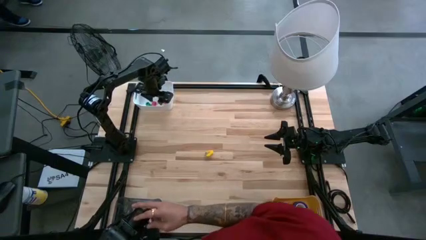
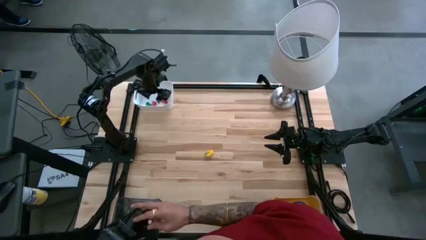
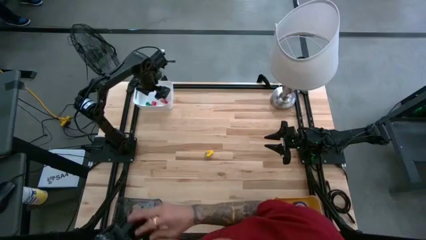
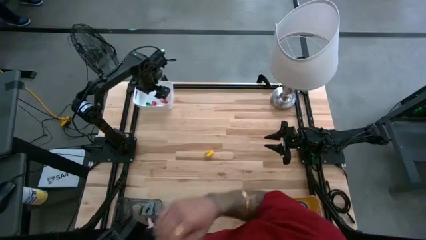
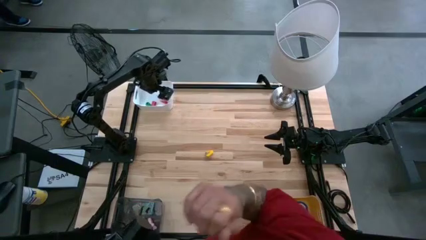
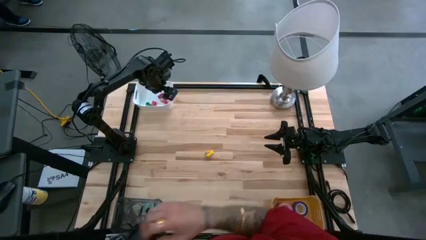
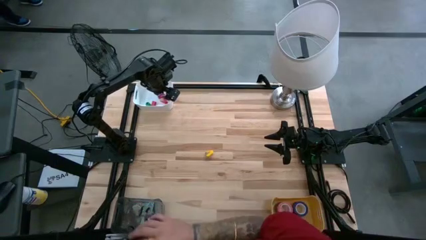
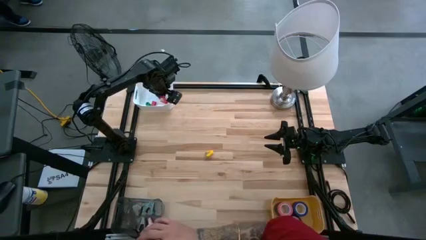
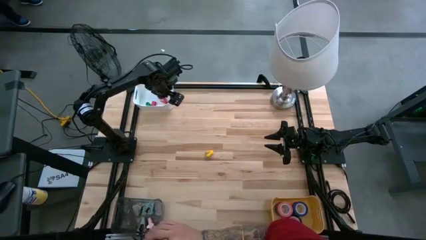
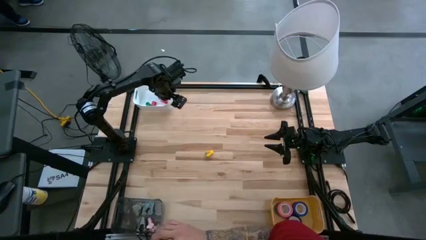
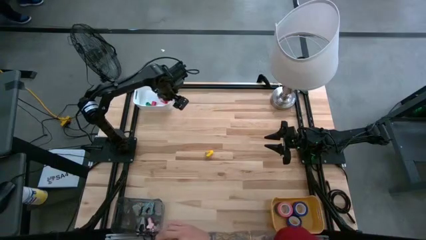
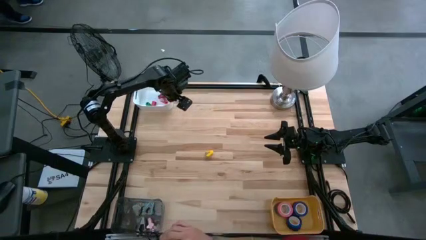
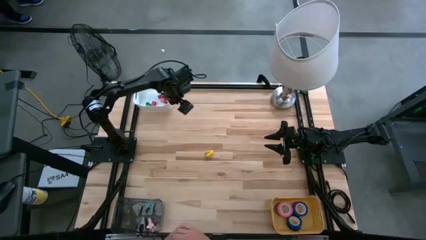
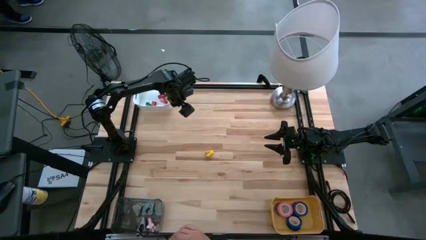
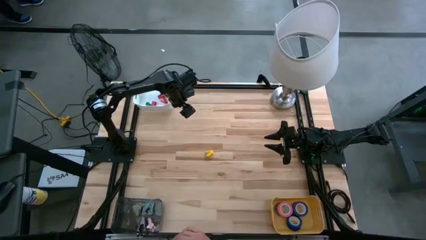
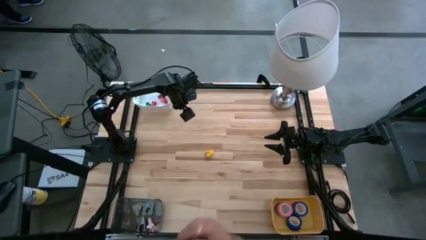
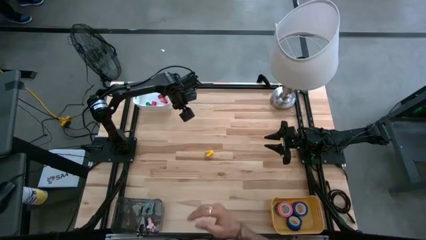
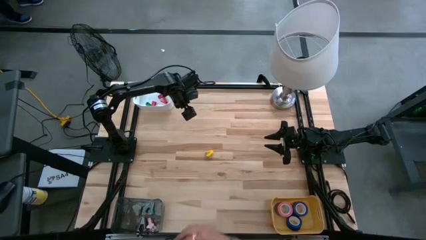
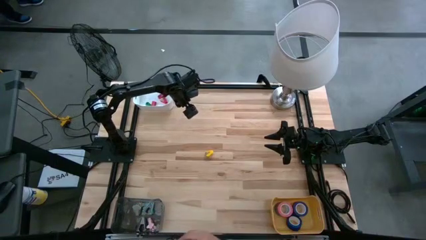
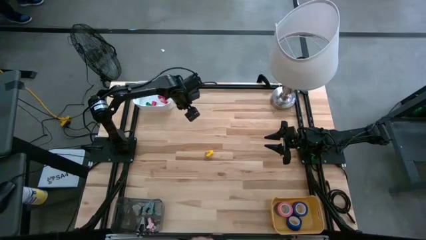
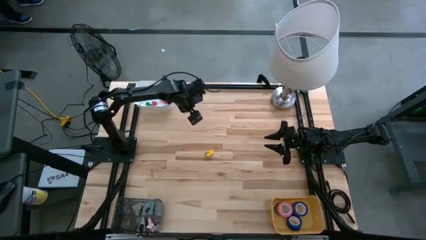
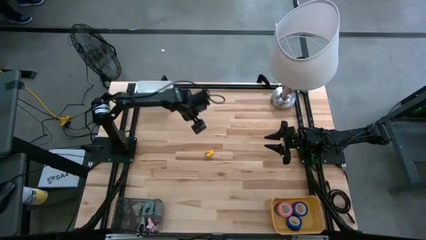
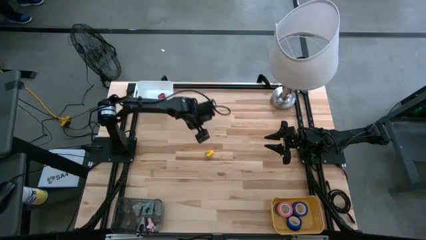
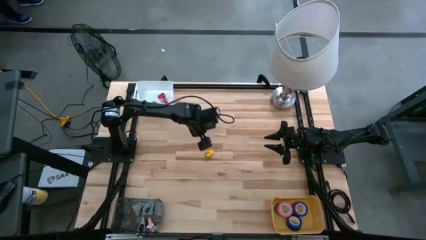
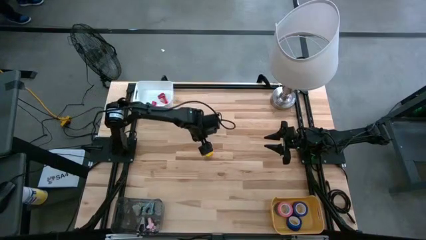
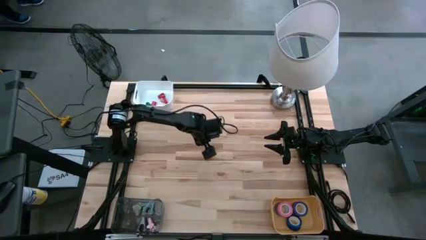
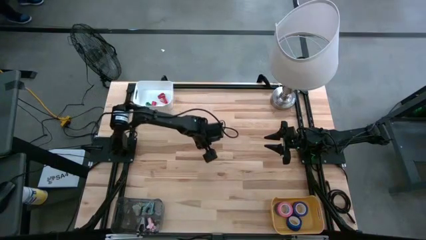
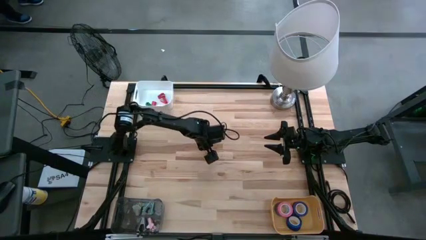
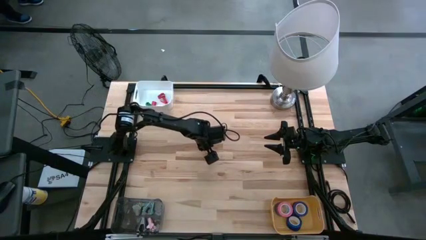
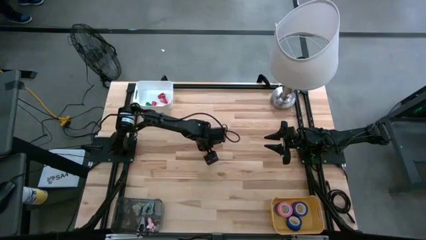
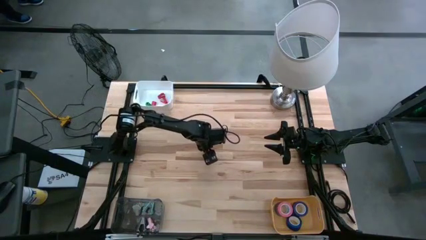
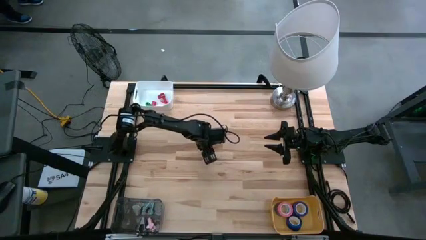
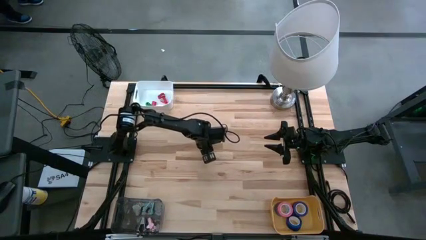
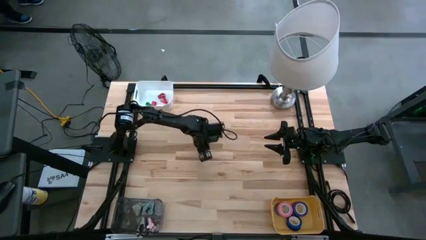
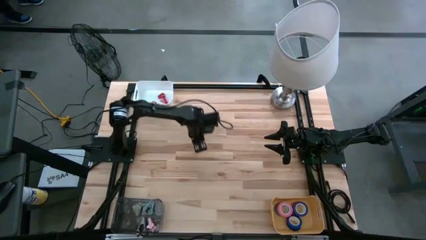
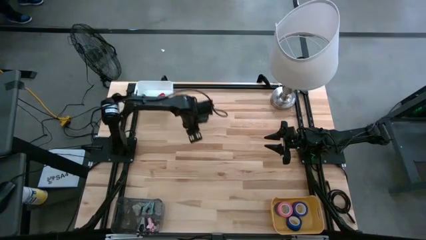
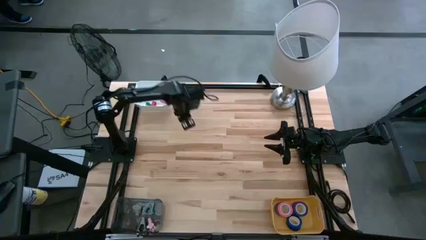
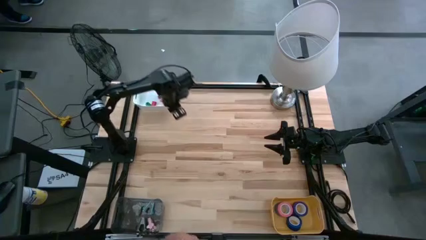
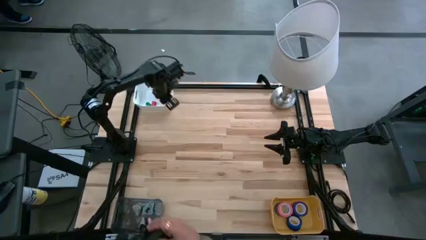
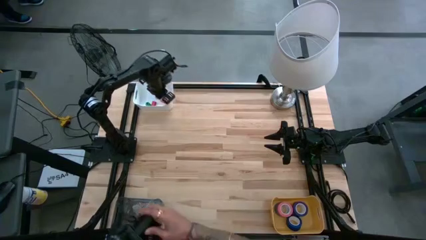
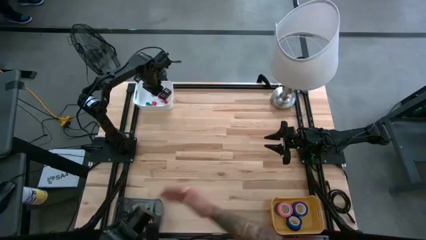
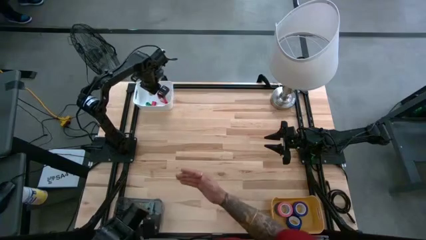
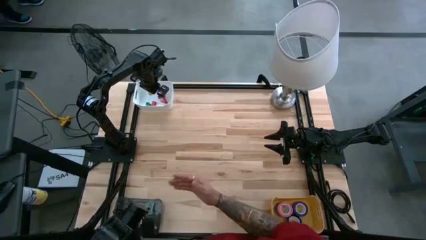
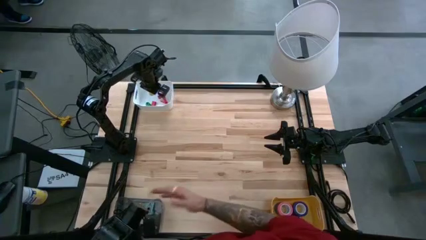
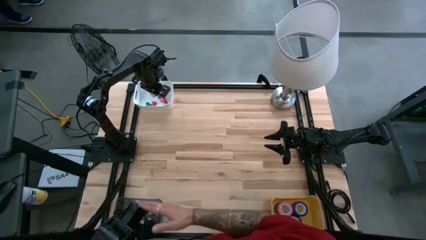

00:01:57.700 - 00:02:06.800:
Task: Pick and place Stapler, Stapler remover, tape
Put the yellow stapler into the white bin

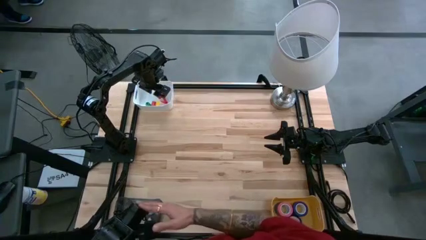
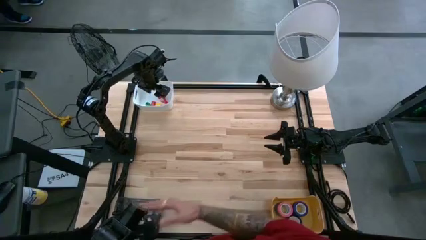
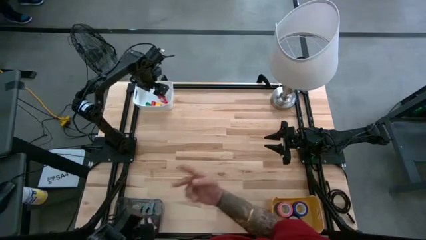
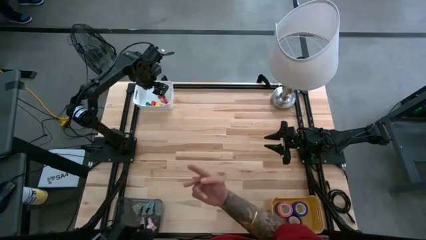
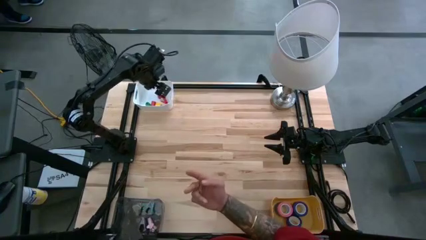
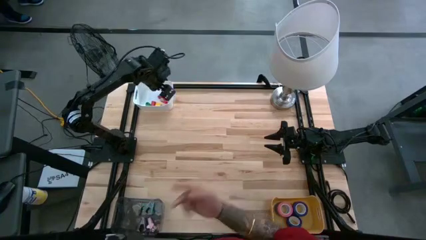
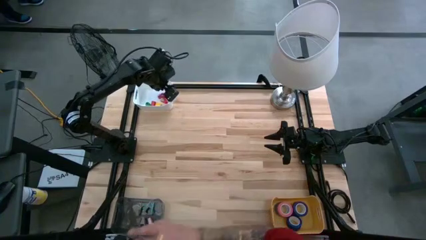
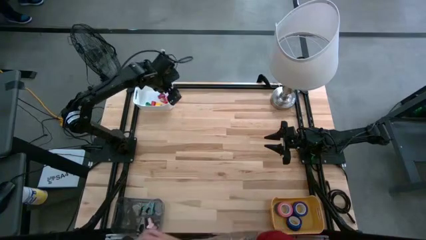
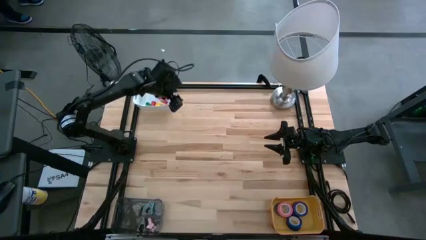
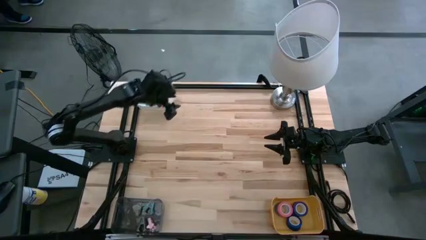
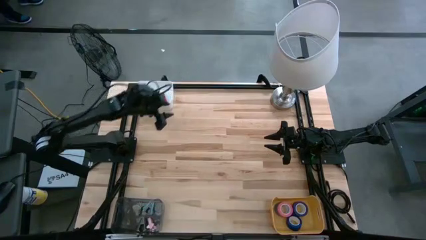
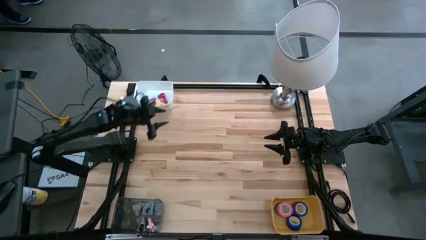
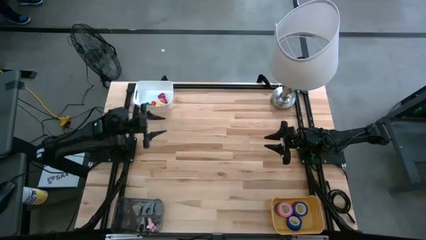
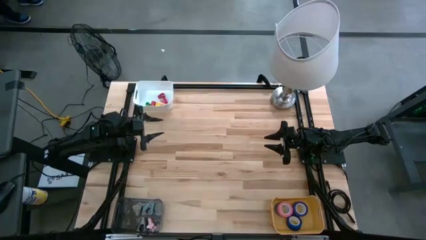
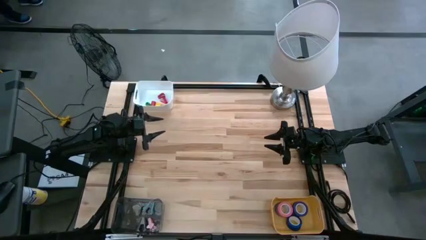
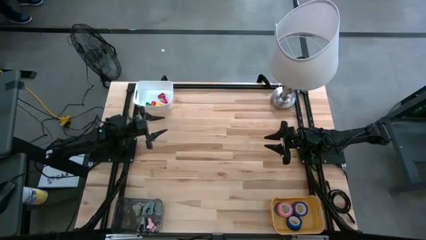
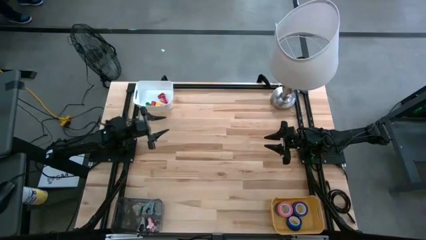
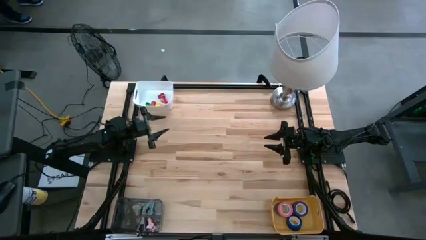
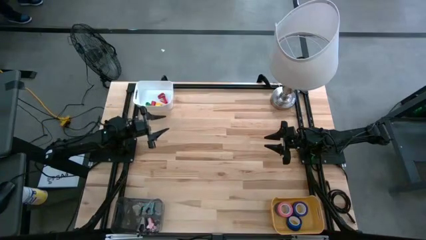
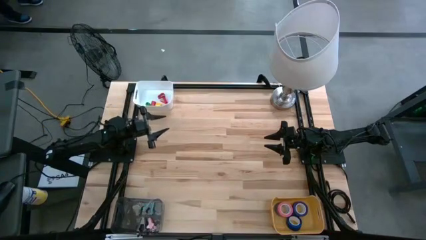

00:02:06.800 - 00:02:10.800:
Return to Home Position
